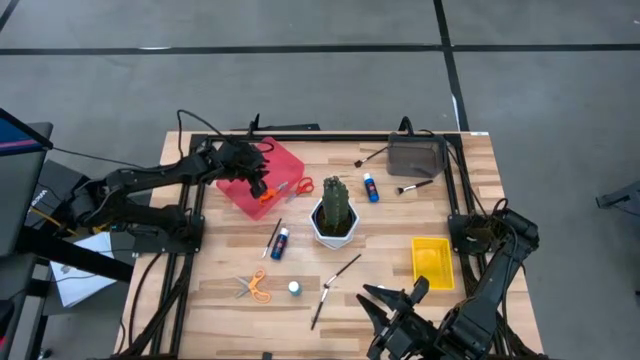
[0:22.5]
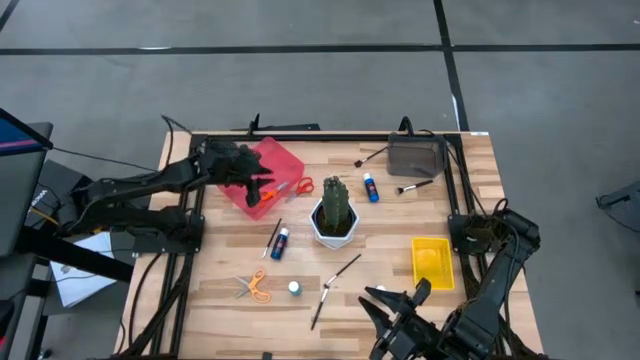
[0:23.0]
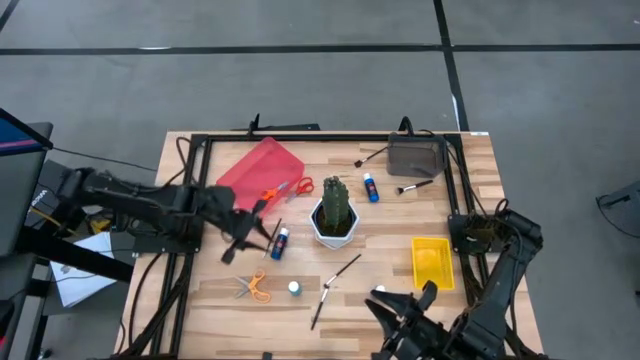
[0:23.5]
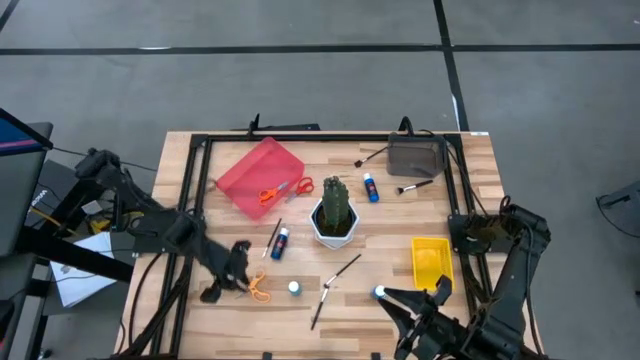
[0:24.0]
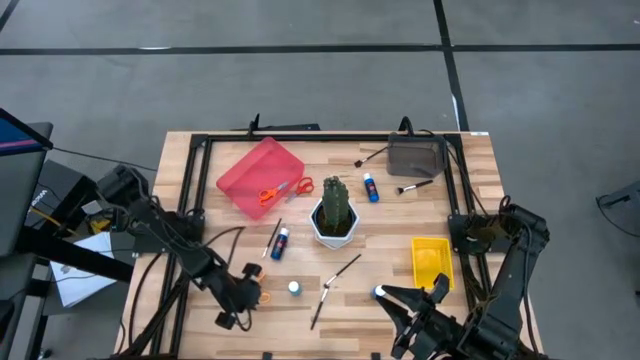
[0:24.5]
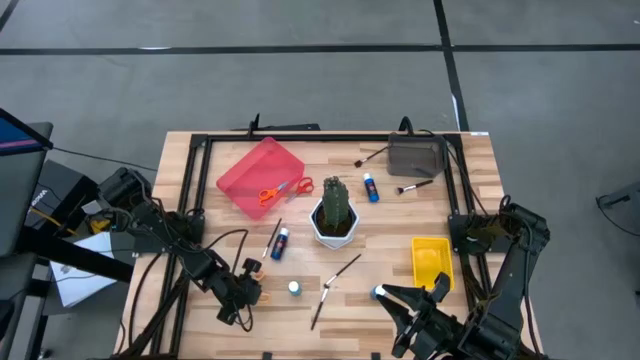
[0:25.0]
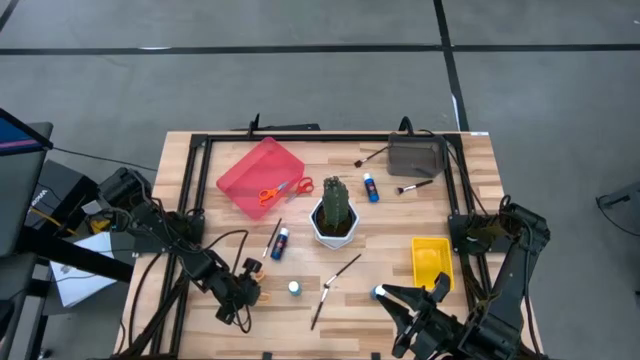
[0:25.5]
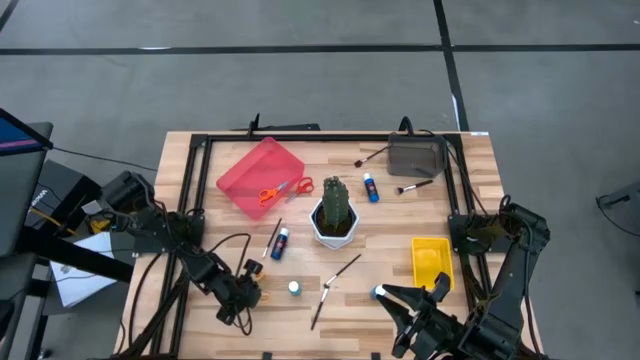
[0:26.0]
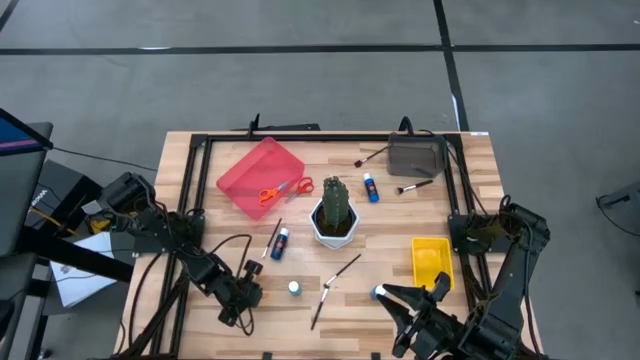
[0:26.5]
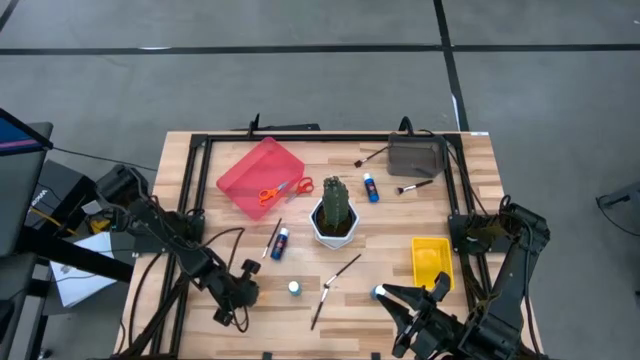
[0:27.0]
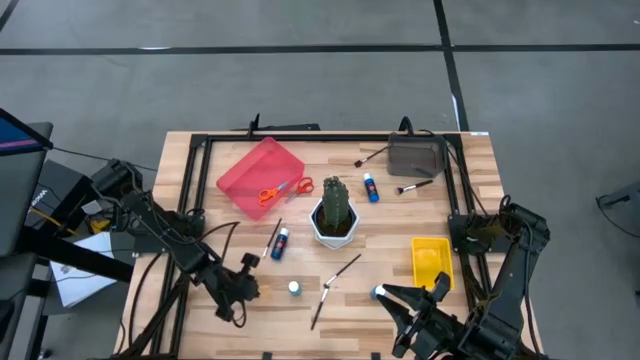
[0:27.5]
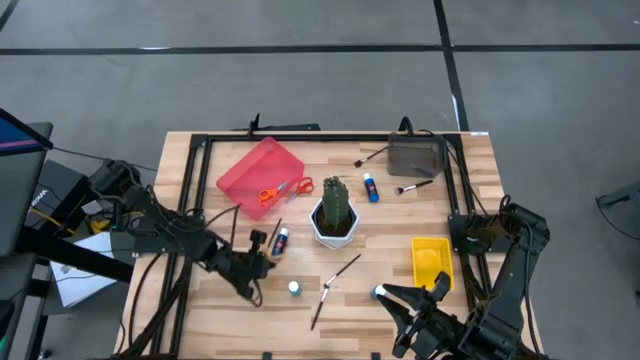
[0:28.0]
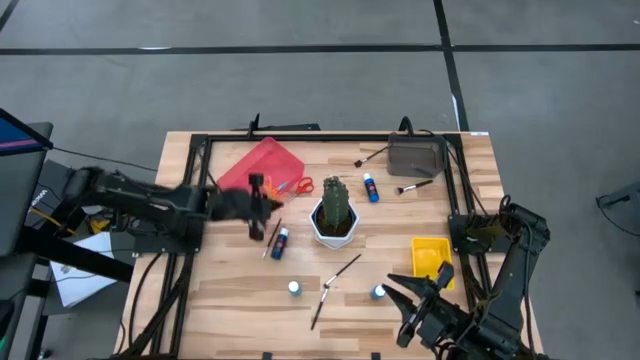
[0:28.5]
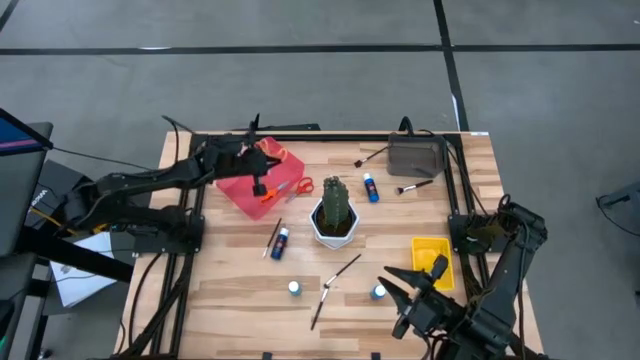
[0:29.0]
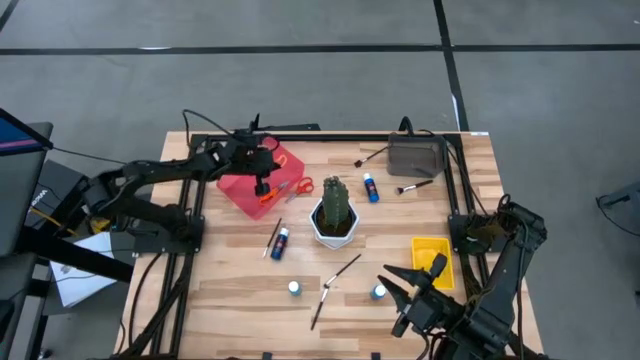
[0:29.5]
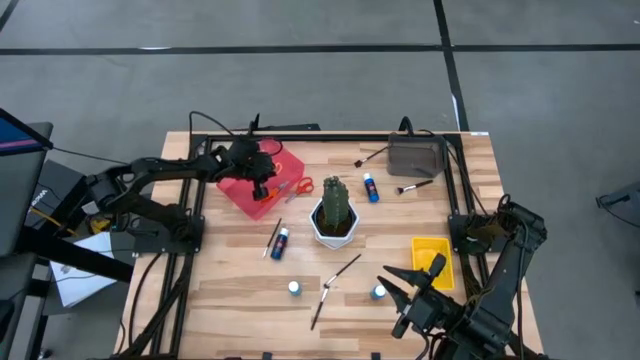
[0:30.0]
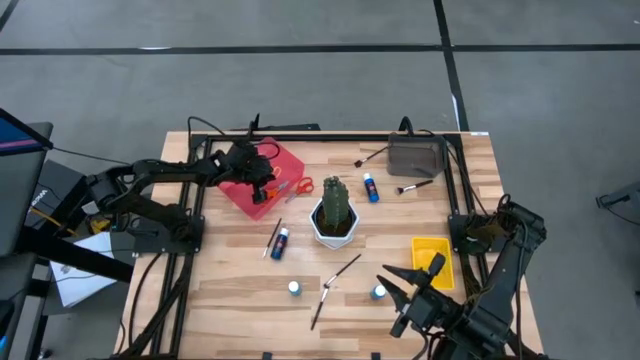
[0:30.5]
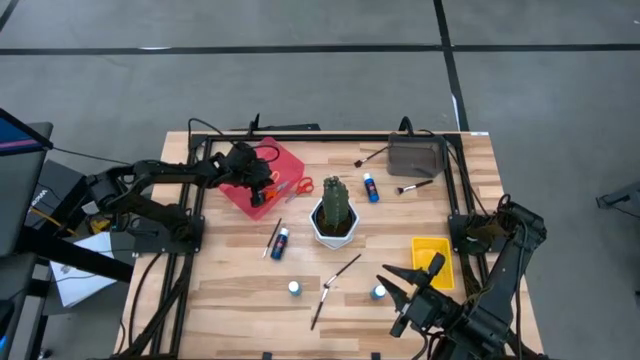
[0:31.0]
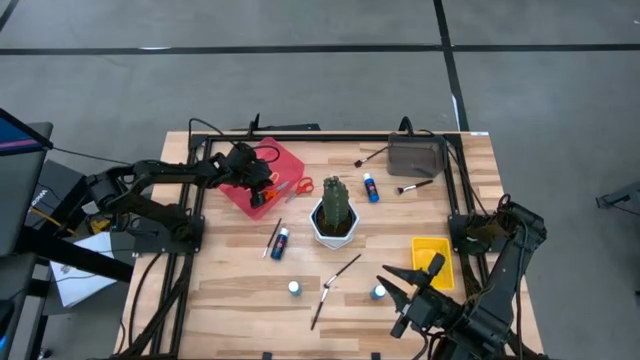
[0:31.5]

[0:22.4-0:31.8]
Task: Pick & Place Paint Supplies
Put the yellow scissors into the pink bin

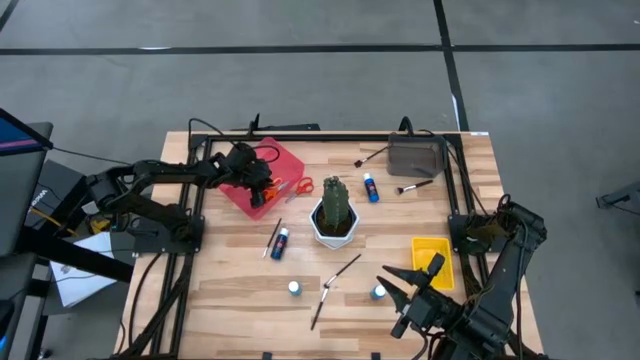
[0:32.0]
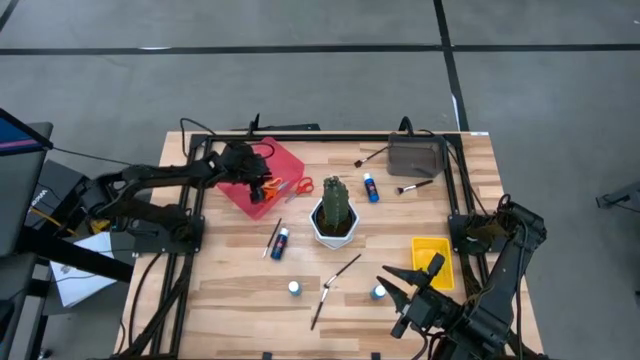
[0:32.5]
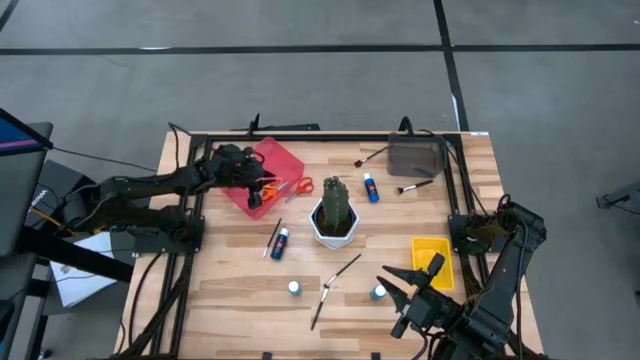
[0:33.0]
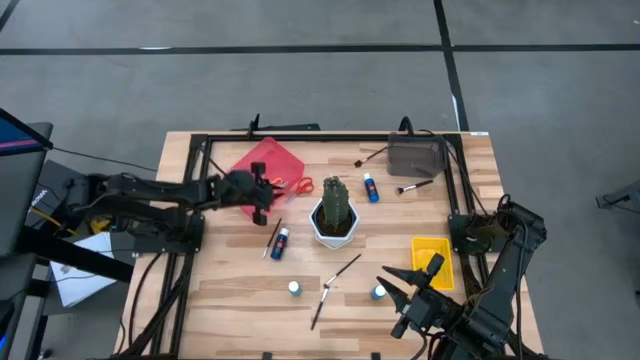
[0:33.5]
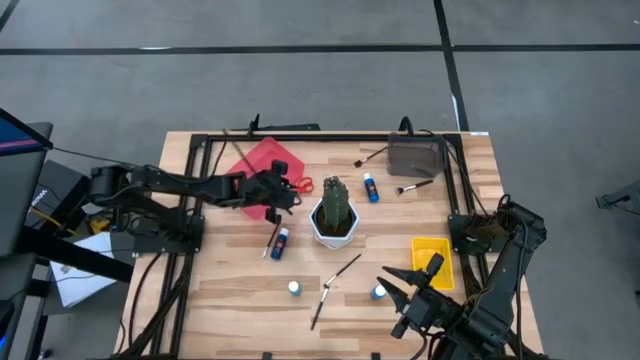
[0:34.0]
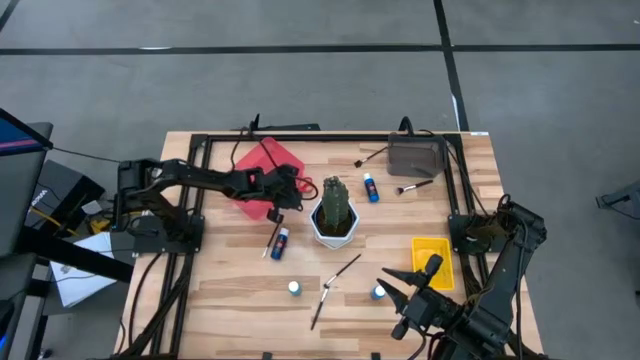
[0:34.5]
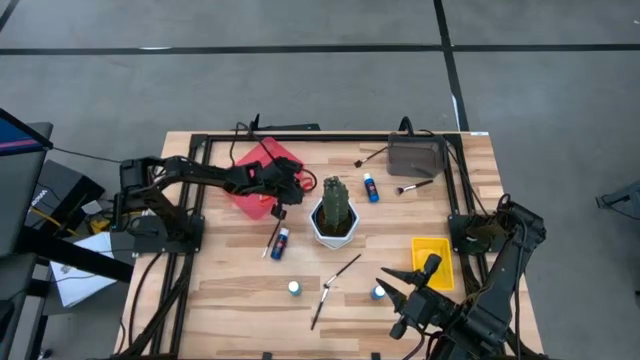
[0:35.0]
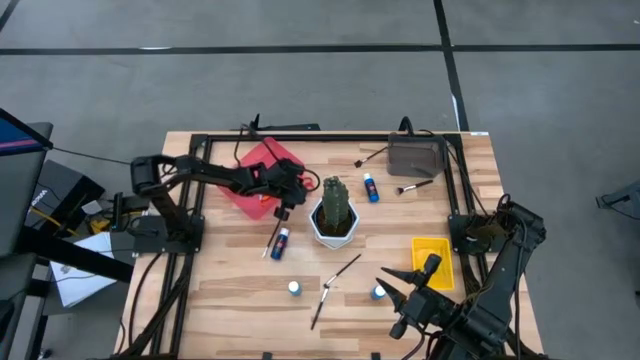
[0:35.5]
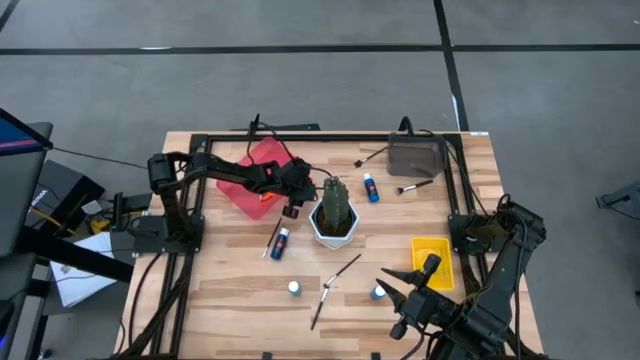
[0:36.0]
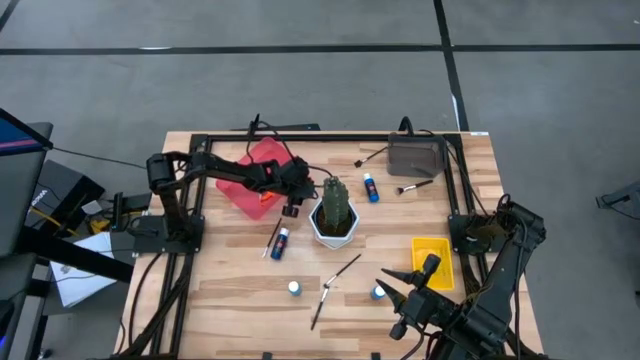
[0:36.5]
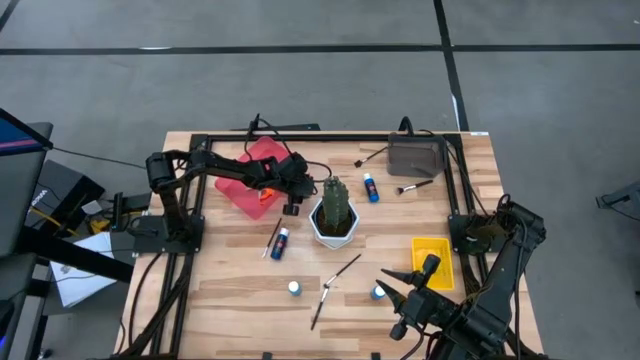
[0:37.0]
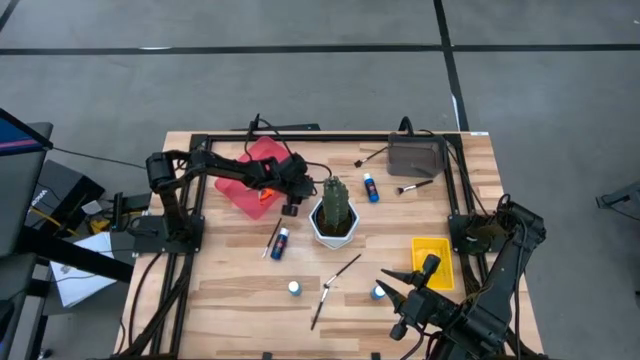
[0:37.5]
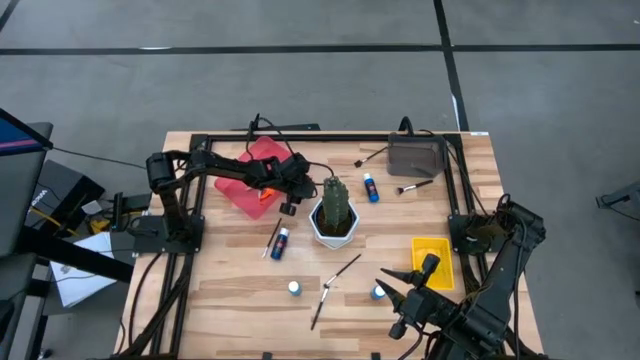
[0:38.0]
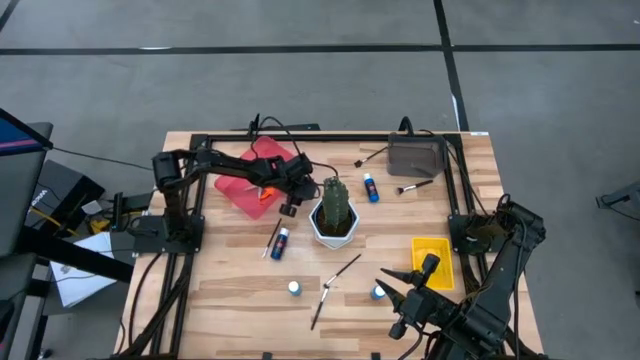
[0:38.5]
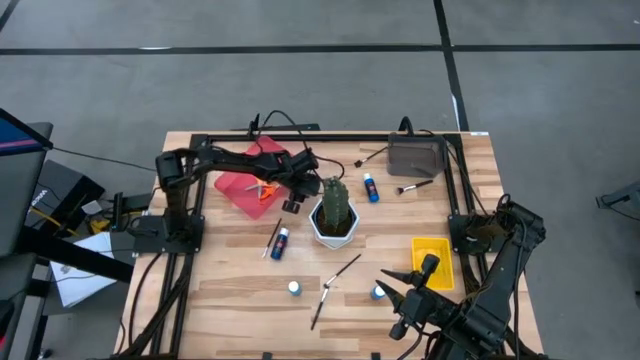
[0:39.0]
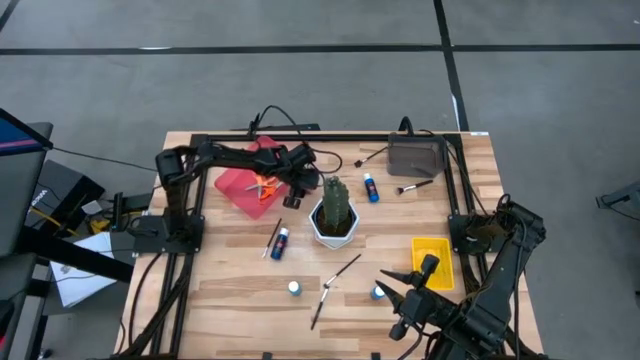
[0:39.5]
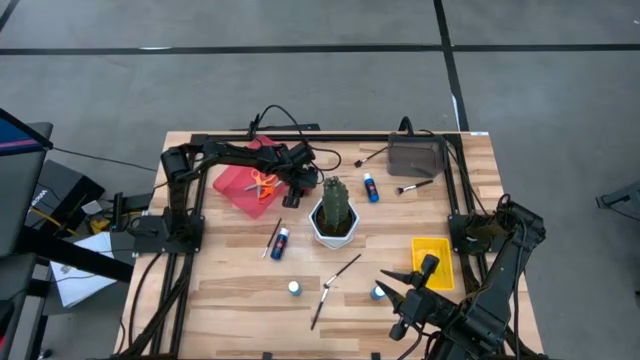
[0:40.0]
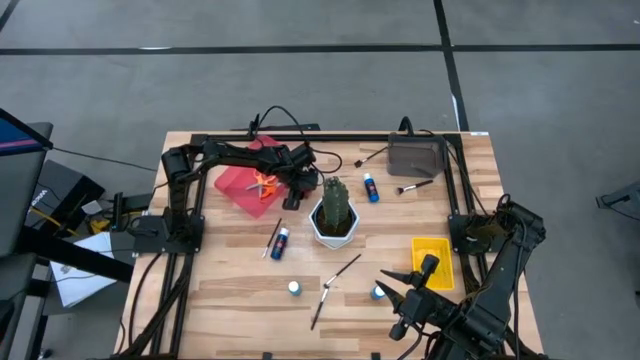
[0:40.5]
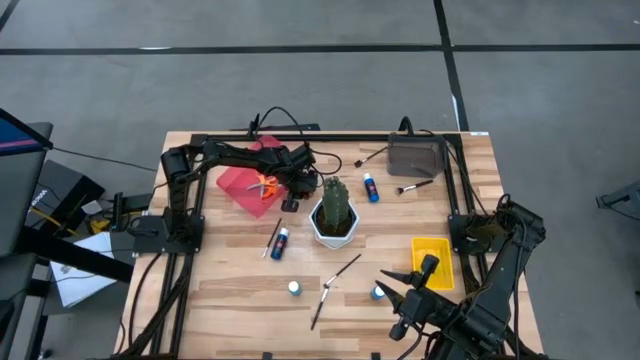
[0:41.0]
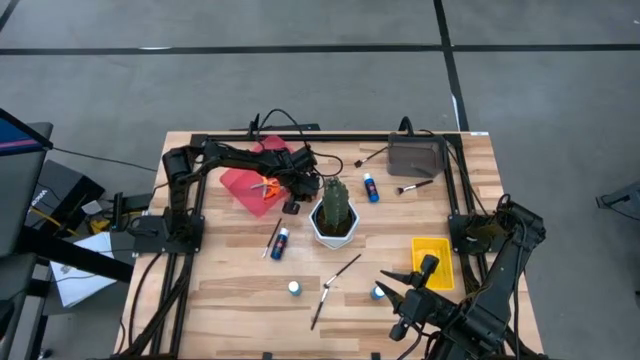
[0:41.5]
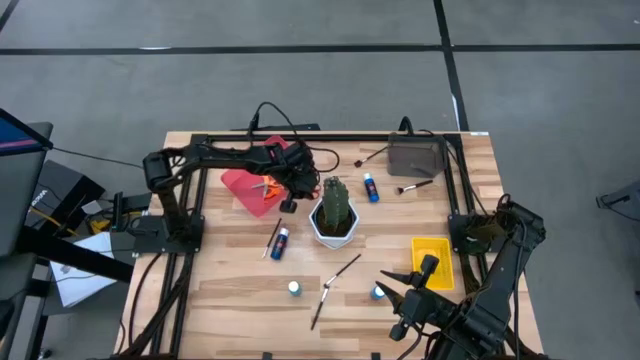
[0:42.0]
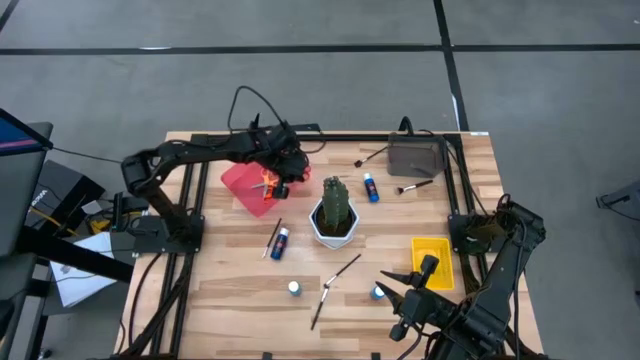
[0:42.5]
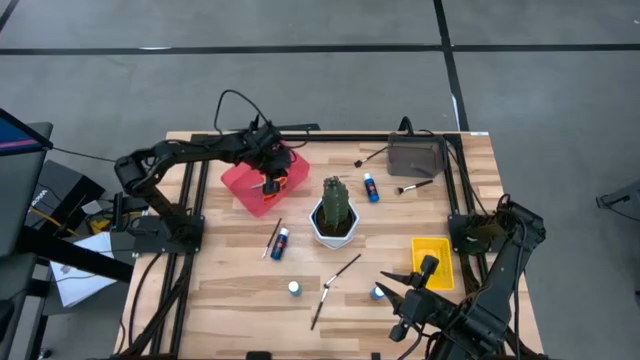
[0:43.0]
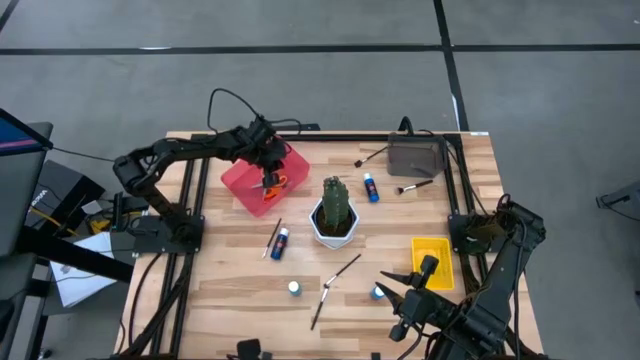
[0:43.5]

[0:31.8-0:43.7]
Put the red scissors into the pink bin
